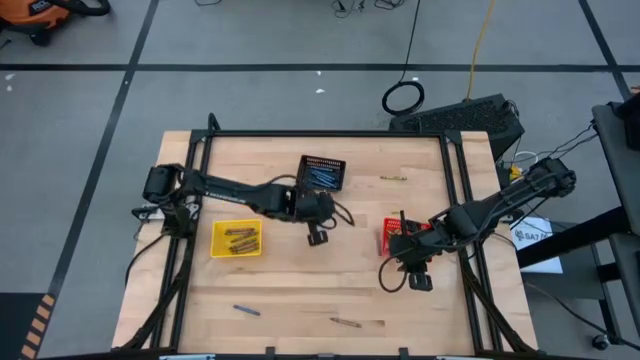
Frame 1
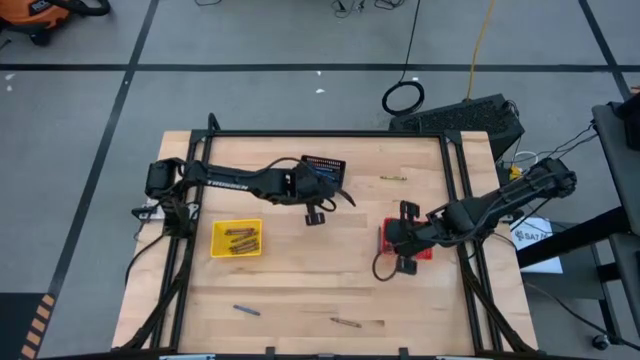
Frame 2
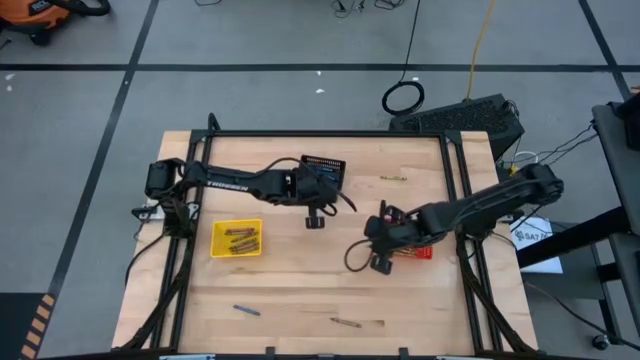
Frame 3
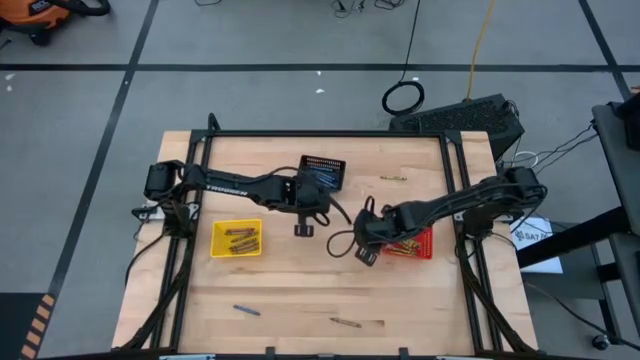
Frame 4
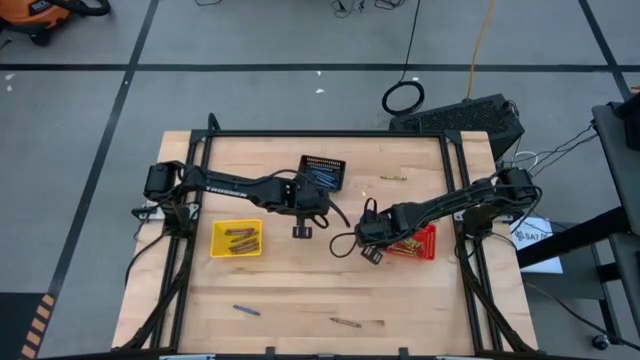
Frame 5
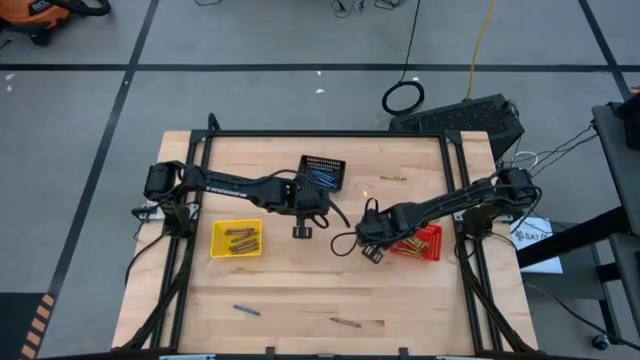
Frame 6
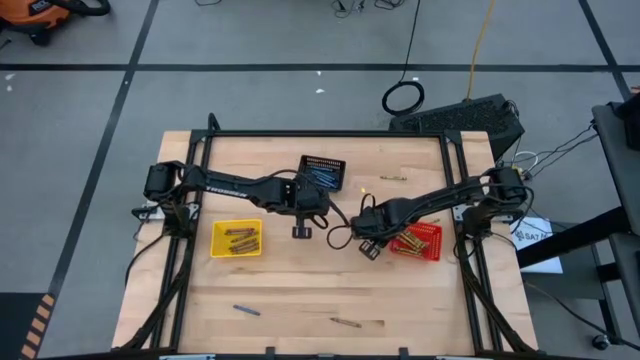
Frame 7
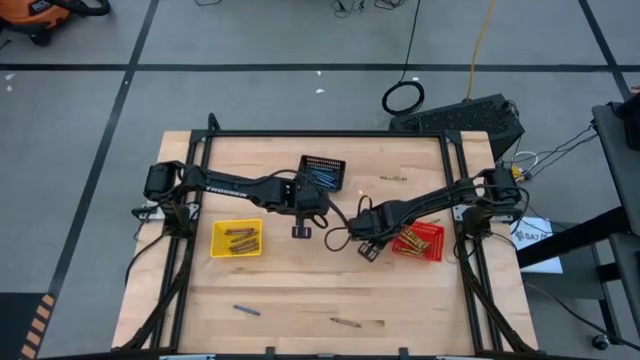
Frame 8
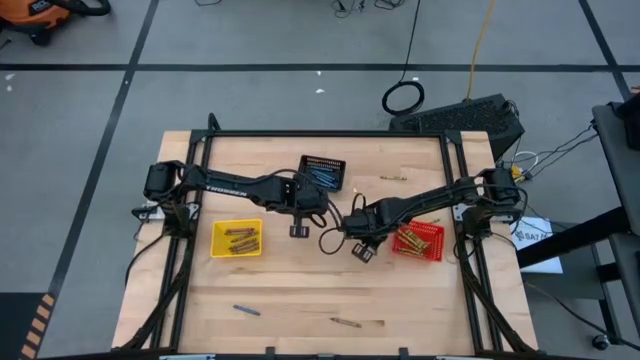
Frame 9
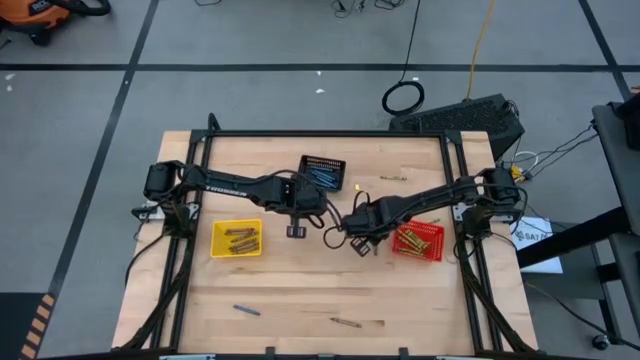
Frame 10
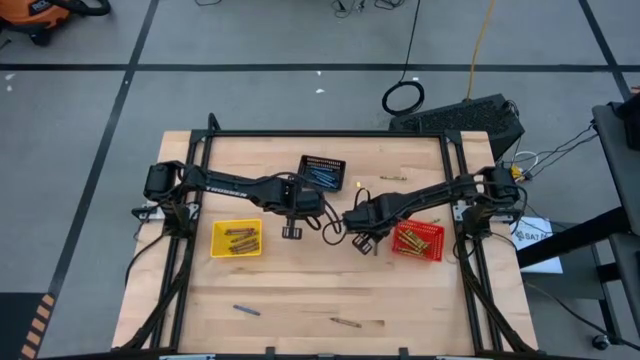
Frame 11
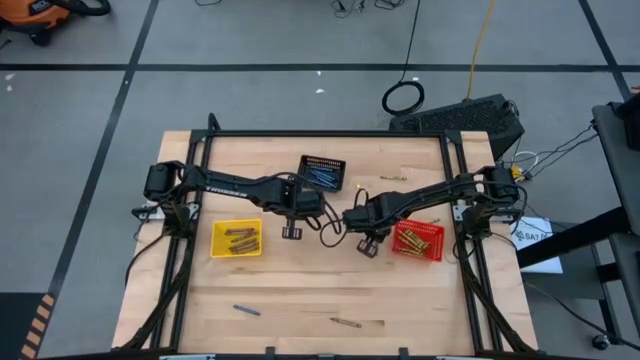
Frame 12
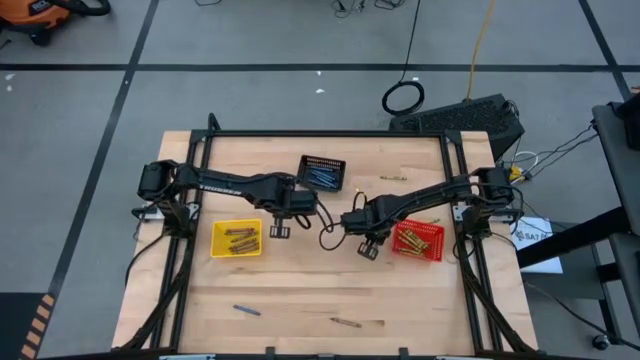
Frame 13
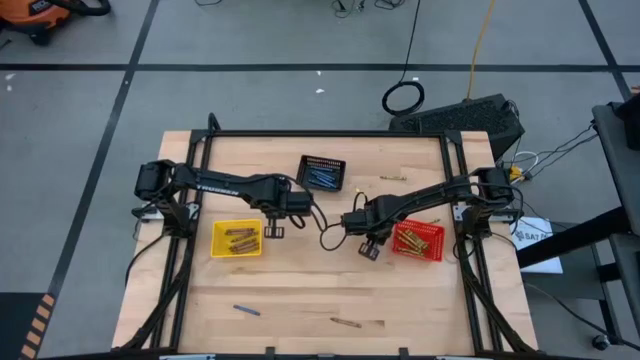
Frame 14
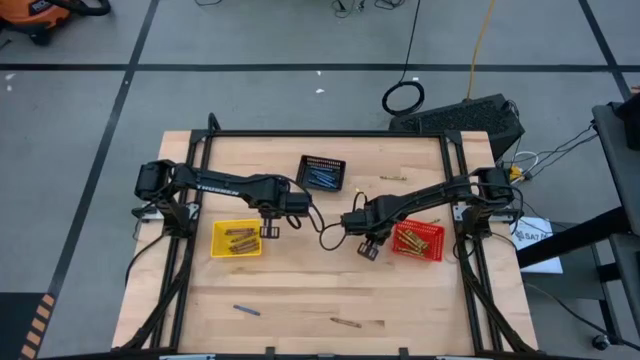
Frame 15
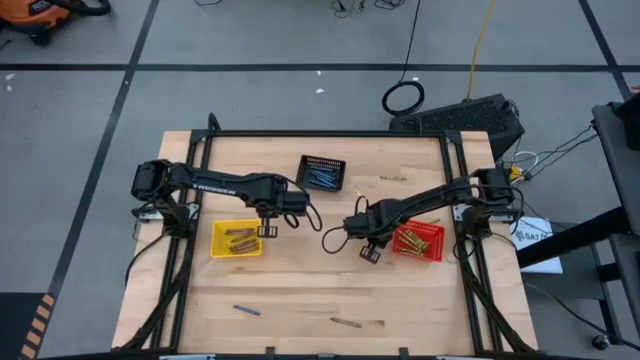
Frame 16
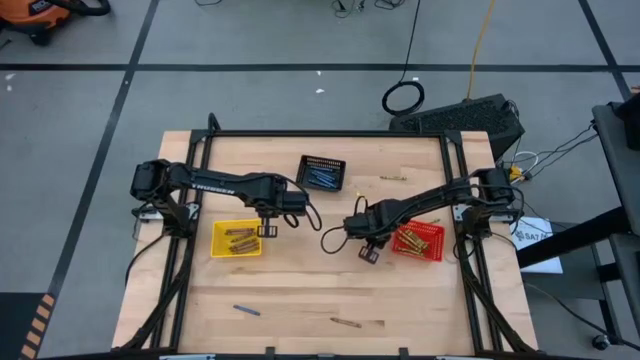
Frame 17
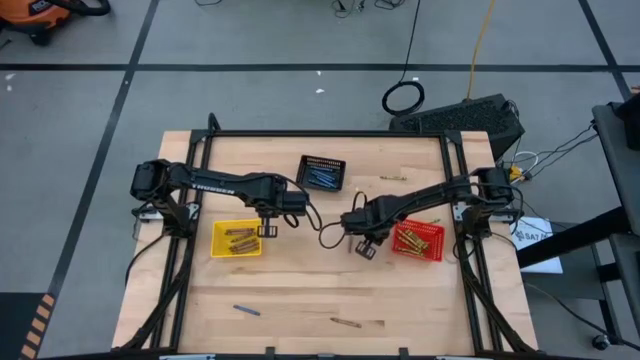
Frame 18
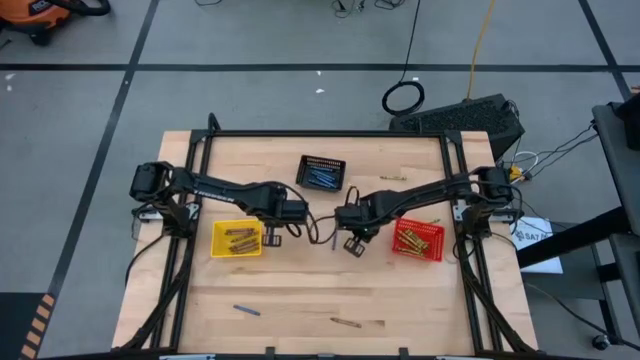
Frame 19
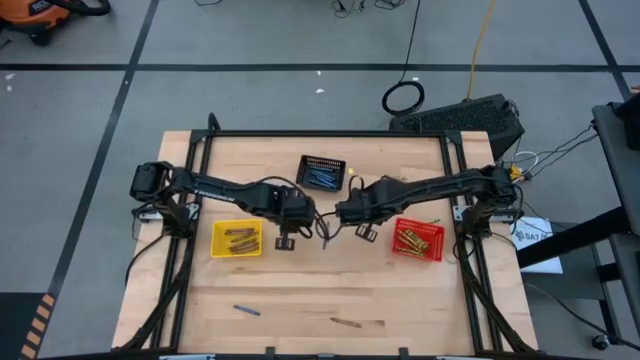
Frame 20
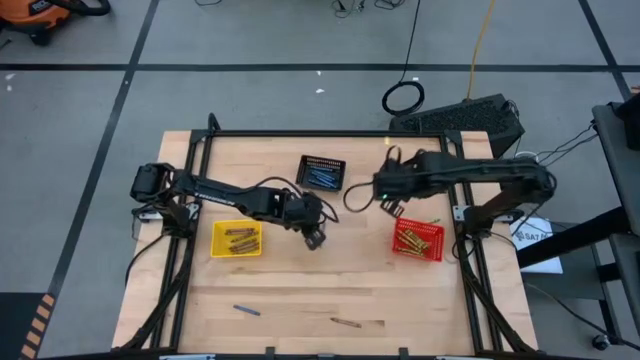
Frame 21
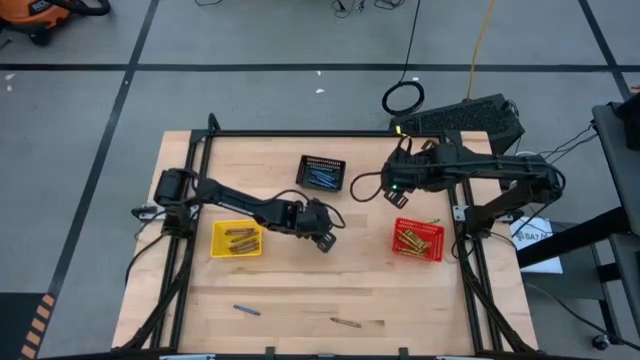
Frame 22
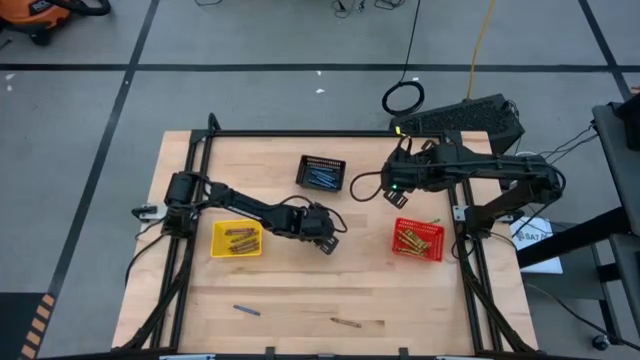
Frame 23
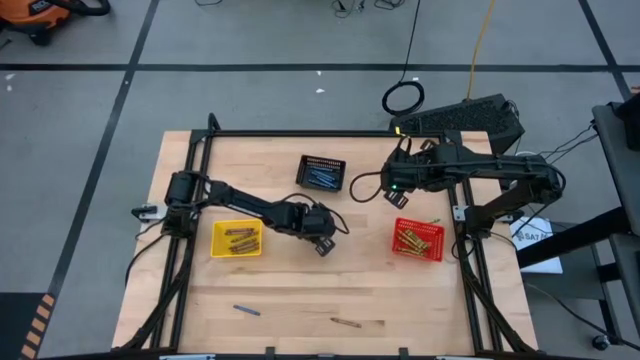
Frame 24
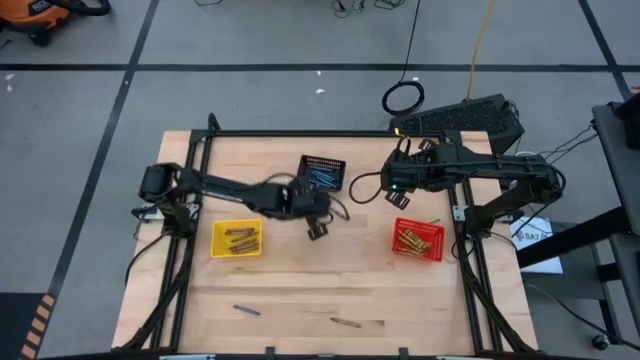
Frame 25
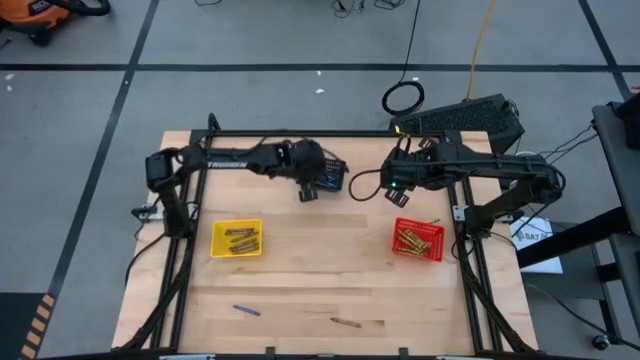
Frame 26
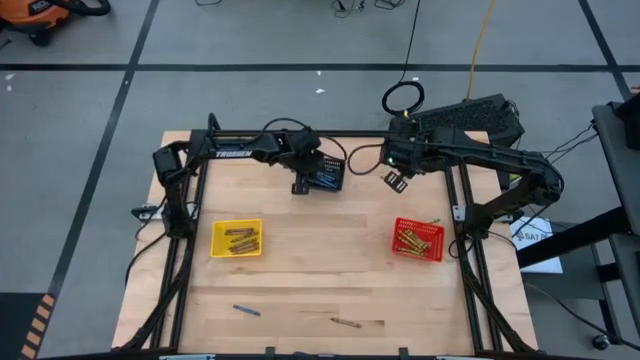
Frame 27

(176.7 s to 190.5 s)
Task: Sort crayons
Put the blue crayon into the black bin

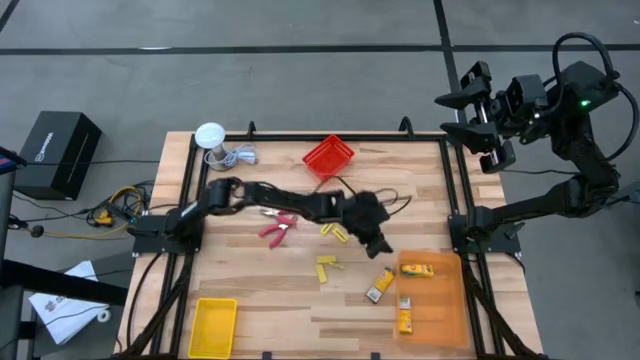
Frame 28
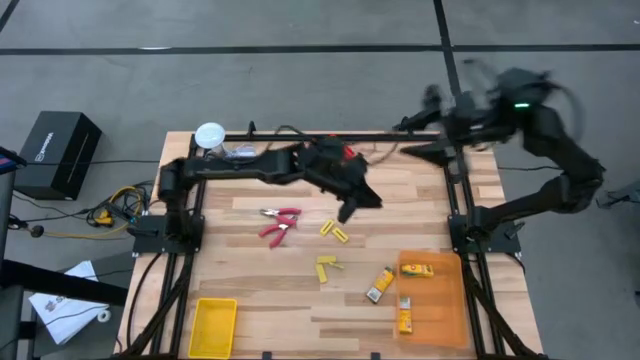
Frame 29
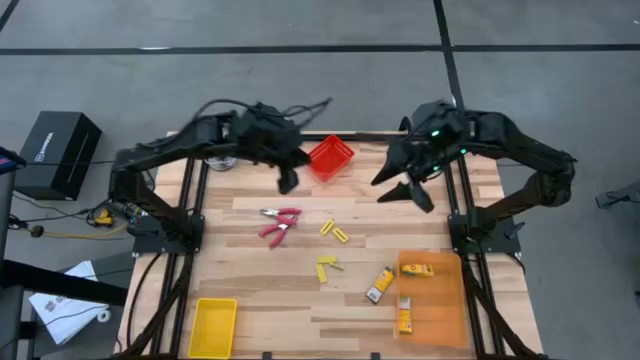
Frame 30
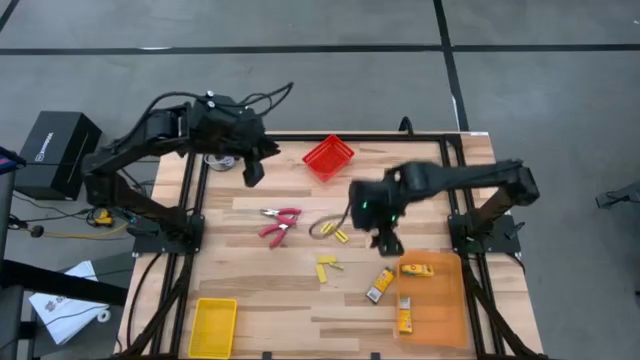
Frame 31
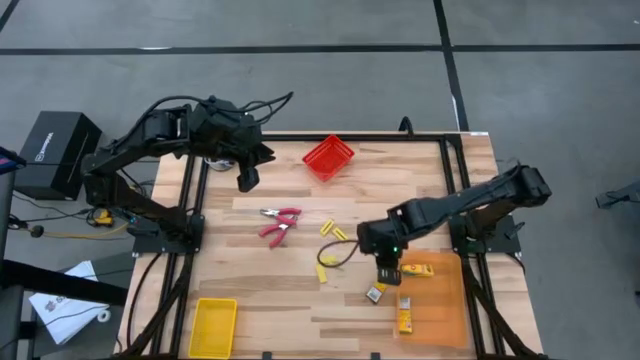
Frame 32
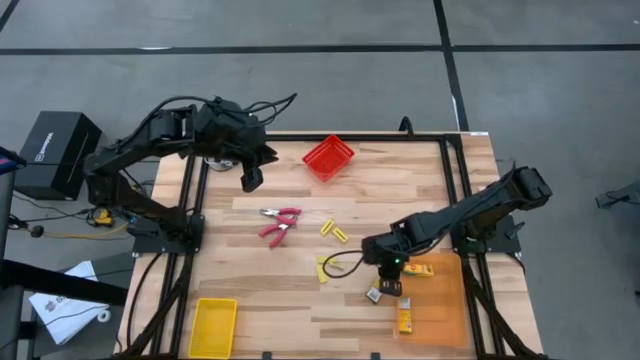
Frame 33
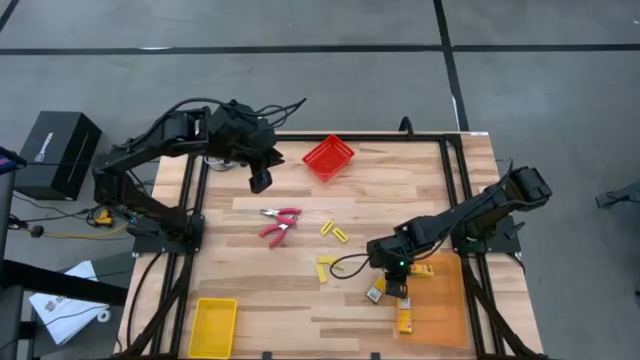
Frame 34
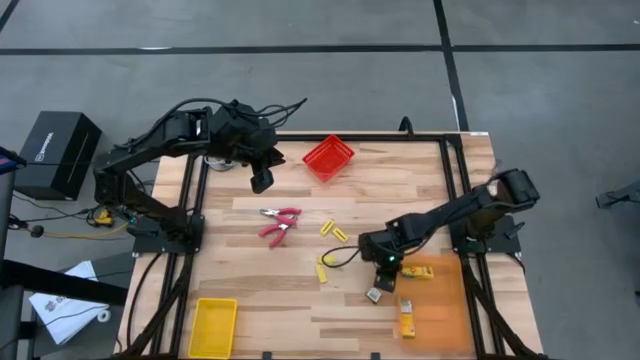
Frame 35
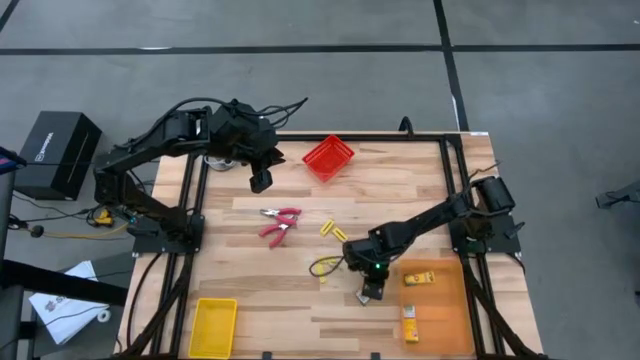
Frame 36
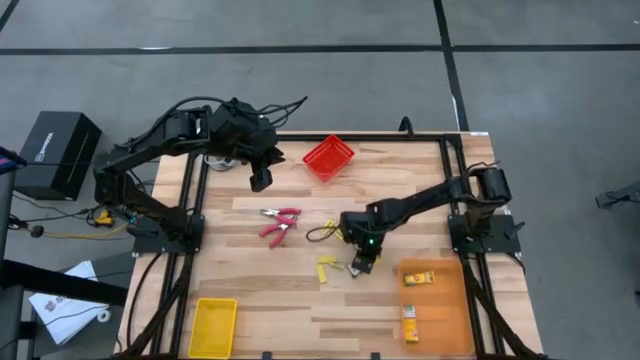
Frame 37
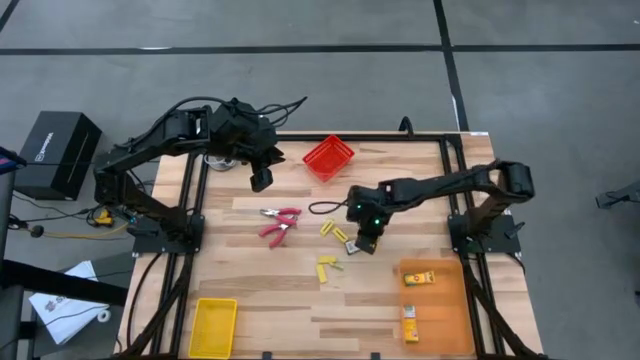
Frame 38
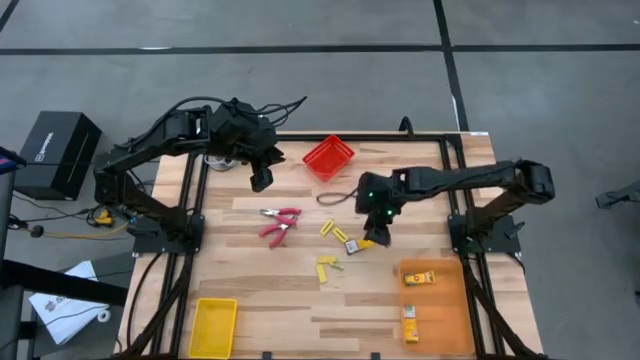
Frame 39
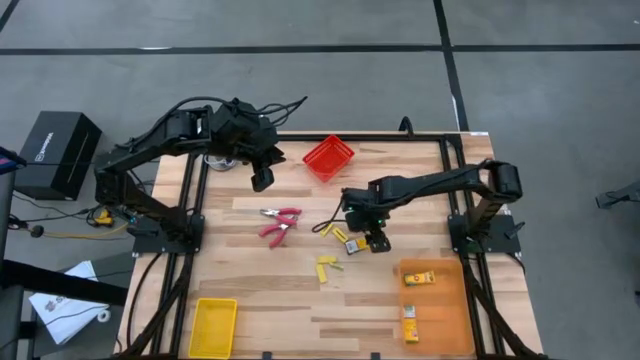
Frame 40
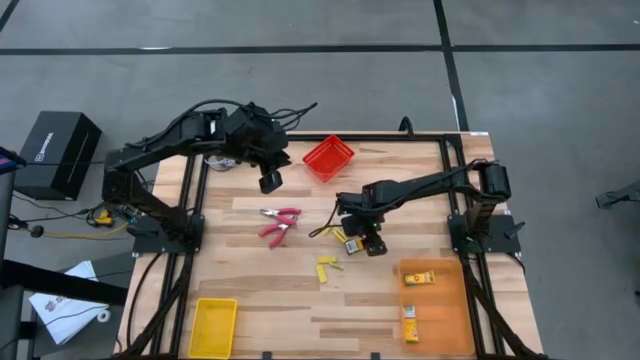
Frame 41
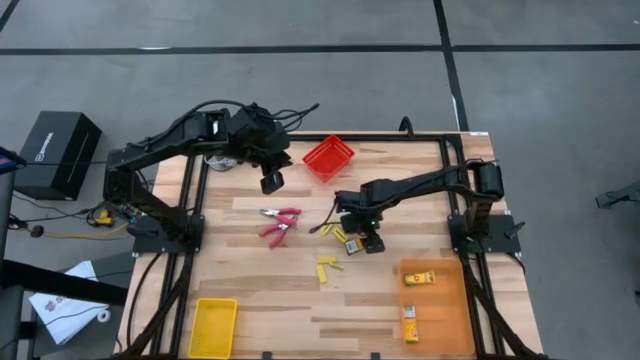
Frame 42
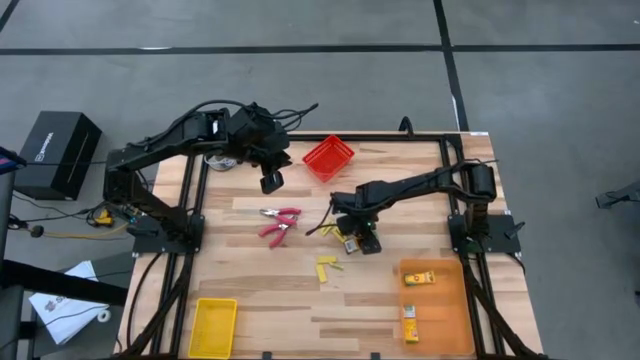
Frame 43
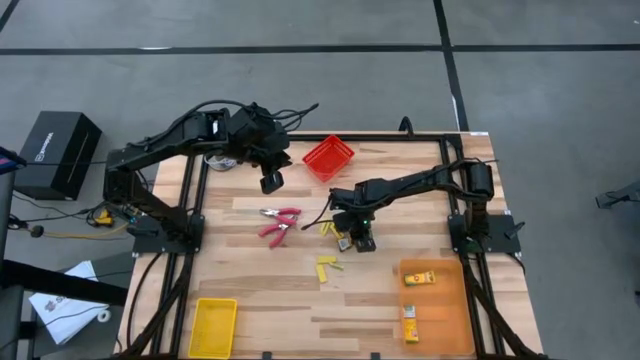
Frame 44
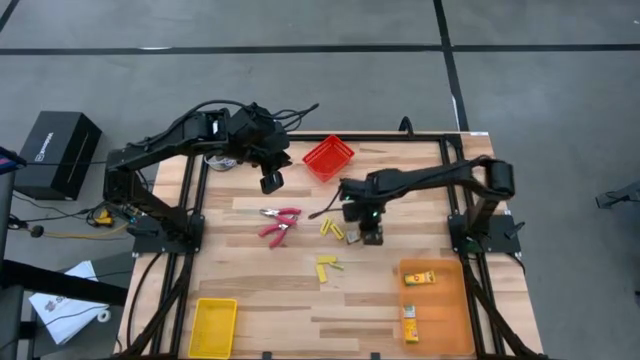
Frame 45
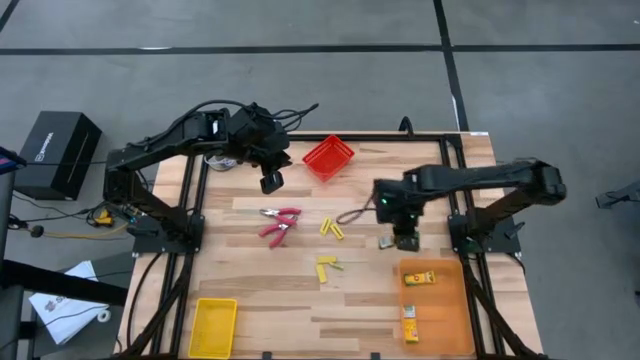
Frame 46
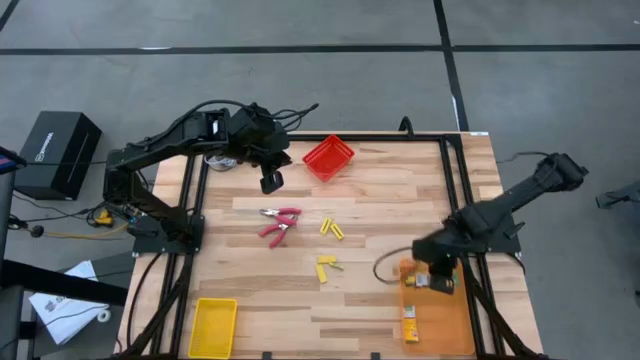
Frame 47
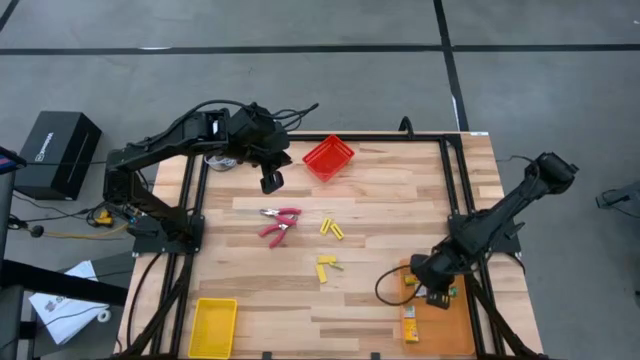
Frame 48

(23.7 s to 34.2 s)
Task: Pick & Place School Supplies
Put the crayon box into the orange bin
